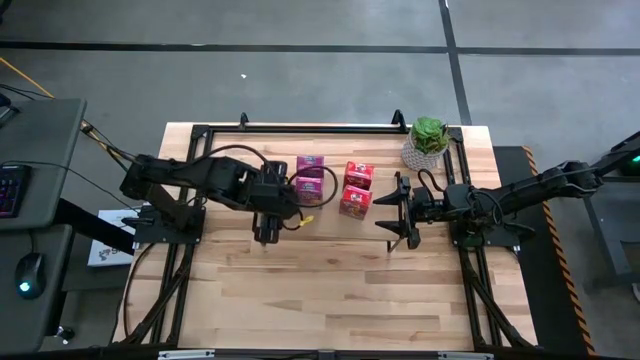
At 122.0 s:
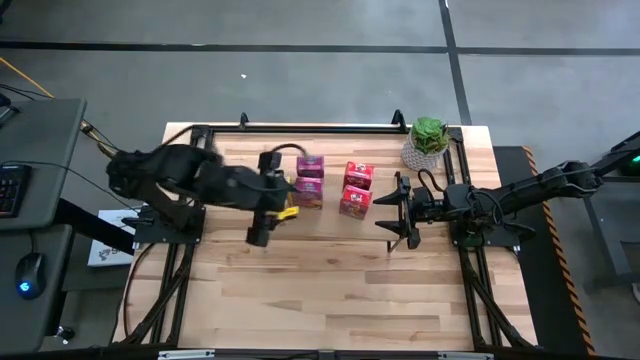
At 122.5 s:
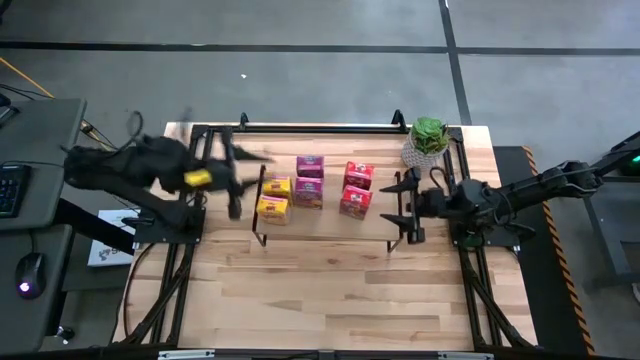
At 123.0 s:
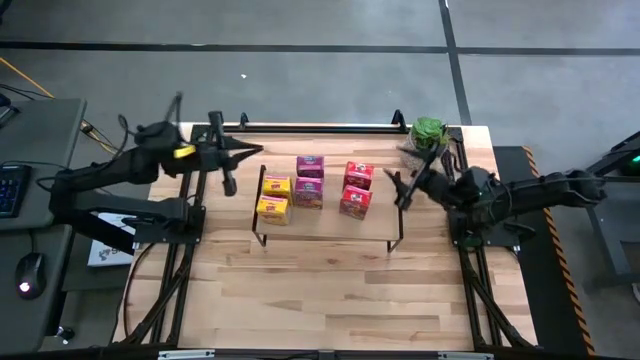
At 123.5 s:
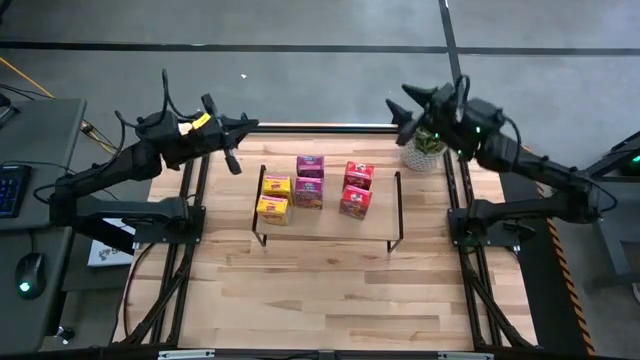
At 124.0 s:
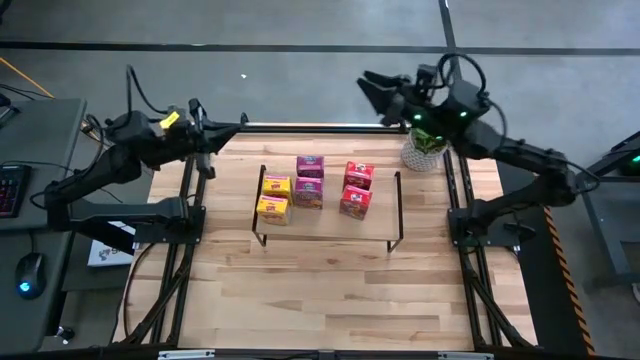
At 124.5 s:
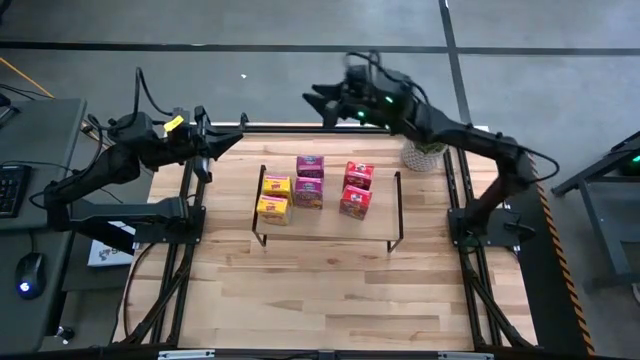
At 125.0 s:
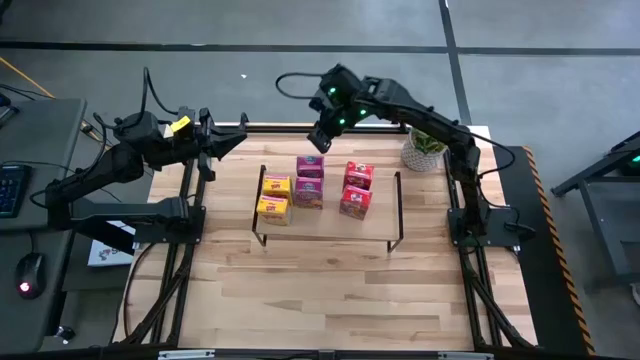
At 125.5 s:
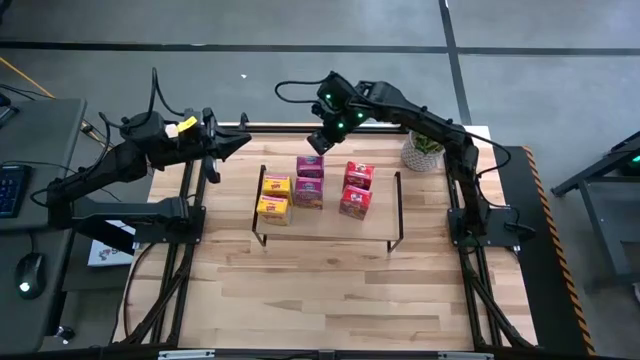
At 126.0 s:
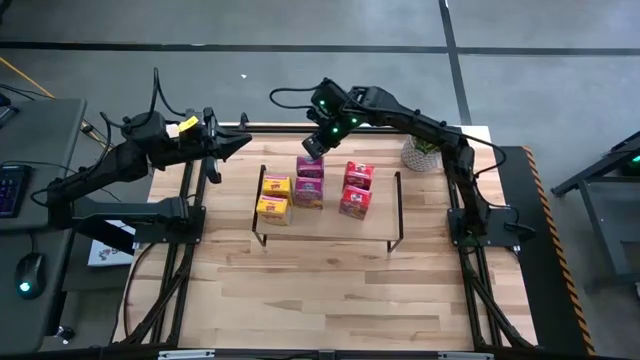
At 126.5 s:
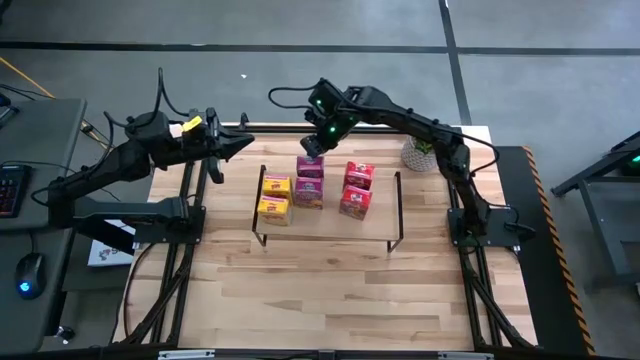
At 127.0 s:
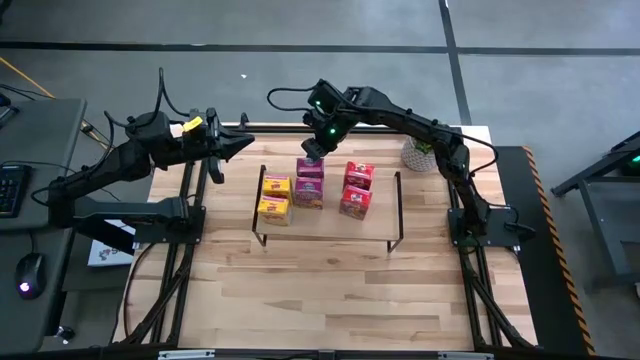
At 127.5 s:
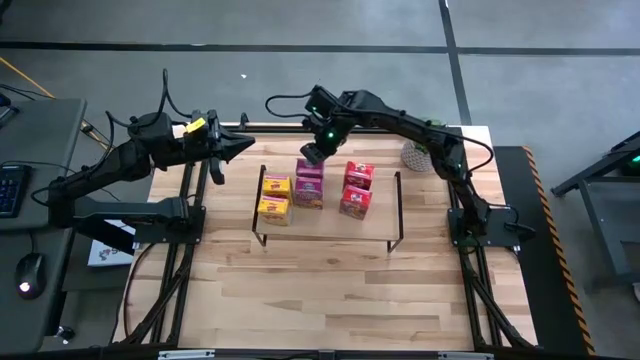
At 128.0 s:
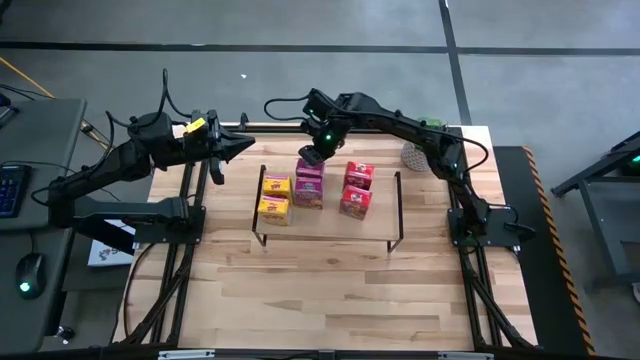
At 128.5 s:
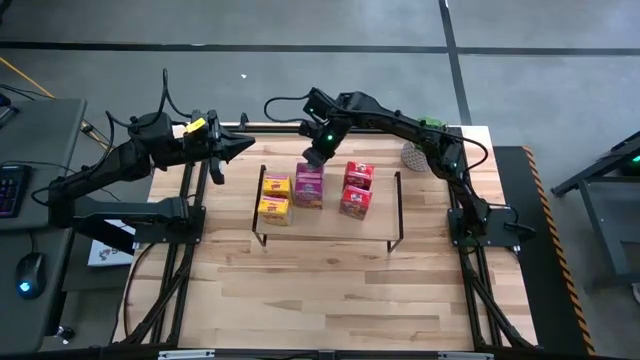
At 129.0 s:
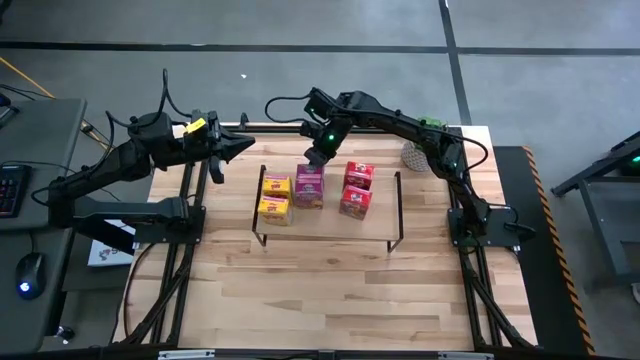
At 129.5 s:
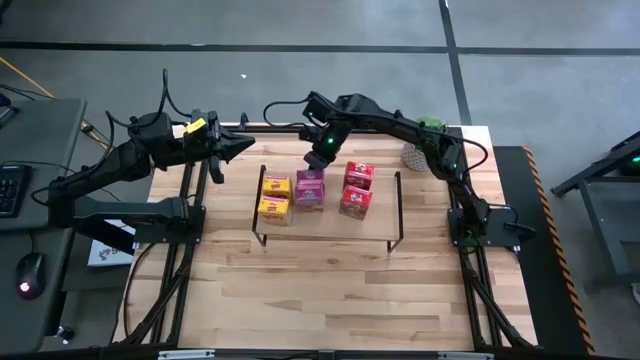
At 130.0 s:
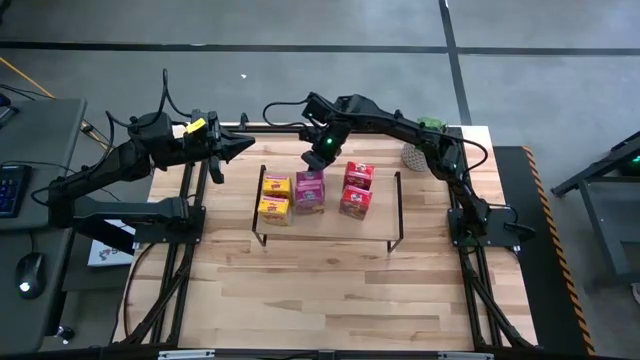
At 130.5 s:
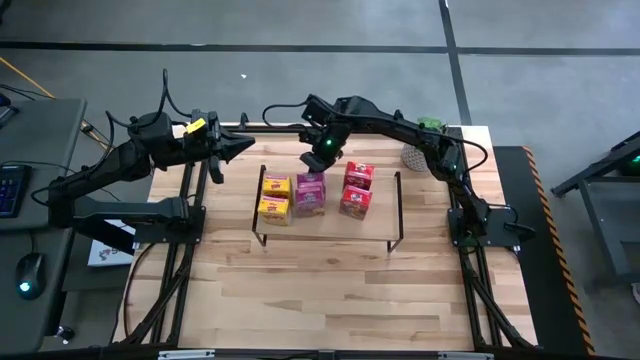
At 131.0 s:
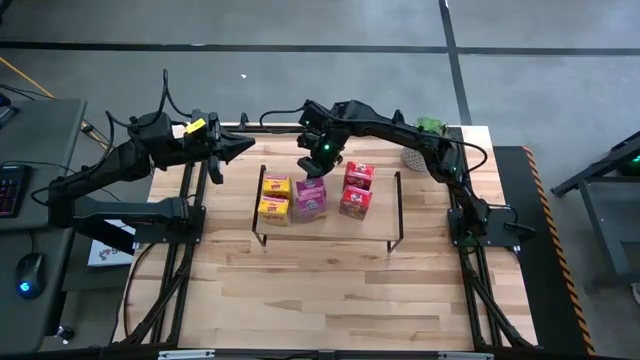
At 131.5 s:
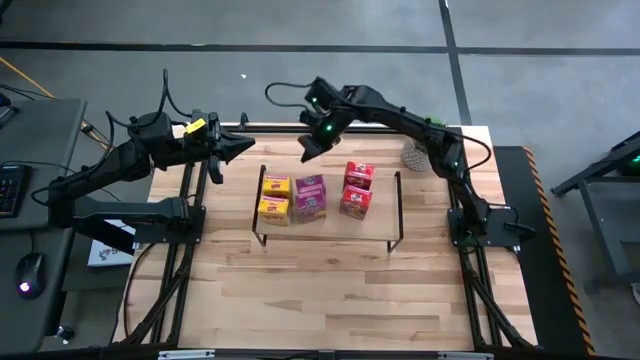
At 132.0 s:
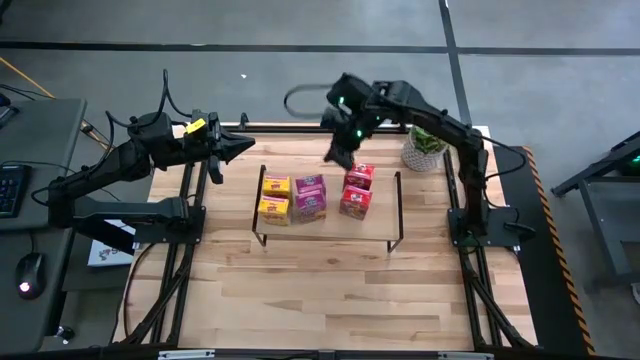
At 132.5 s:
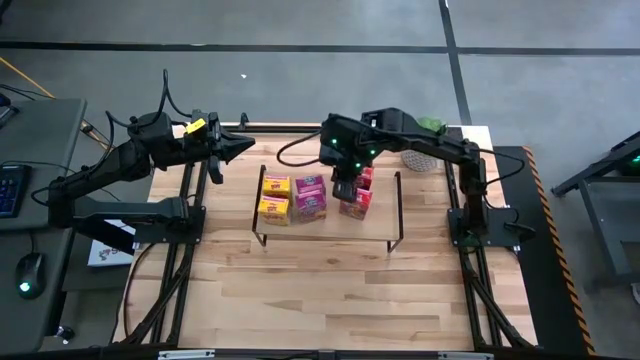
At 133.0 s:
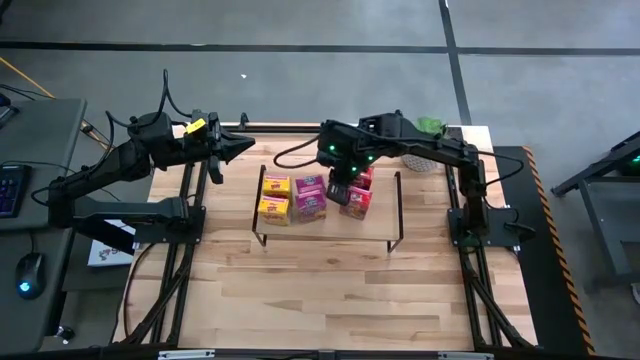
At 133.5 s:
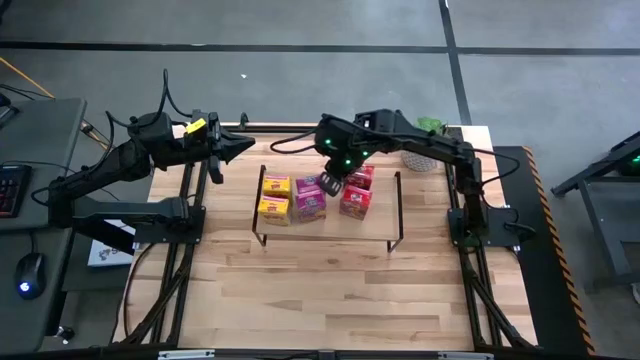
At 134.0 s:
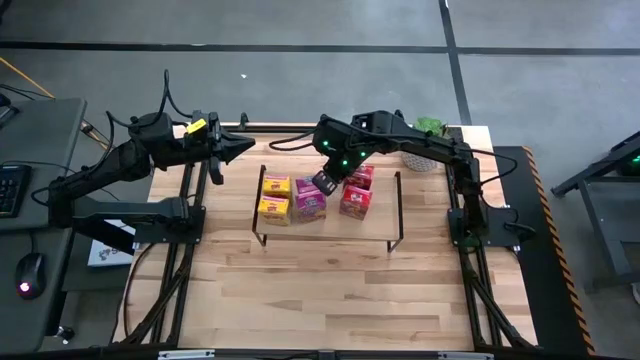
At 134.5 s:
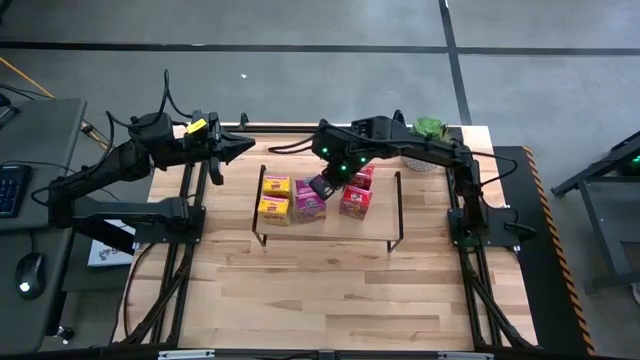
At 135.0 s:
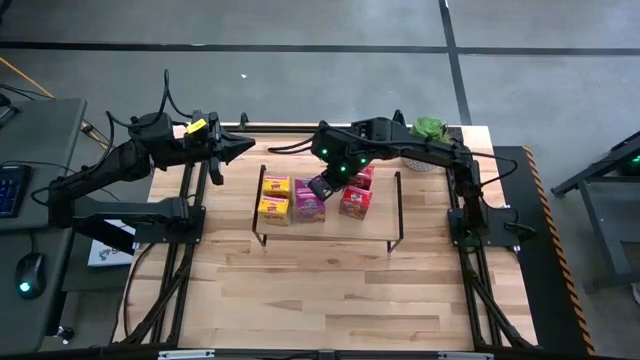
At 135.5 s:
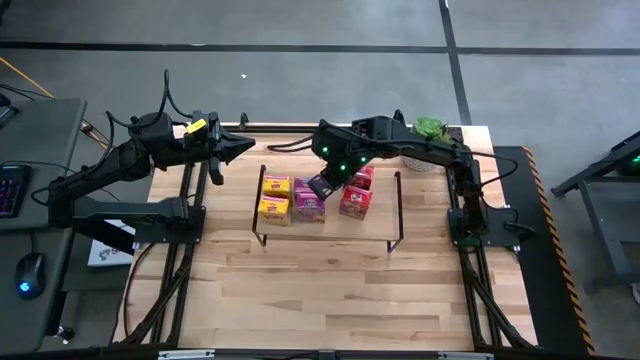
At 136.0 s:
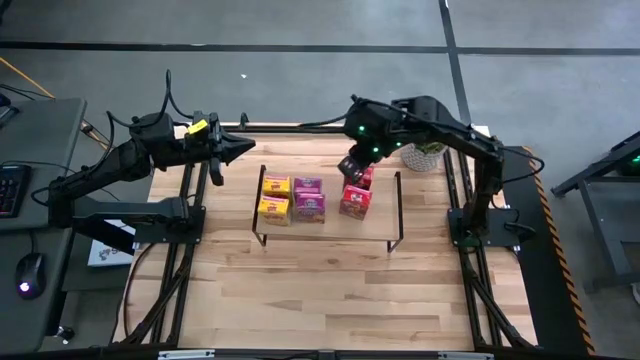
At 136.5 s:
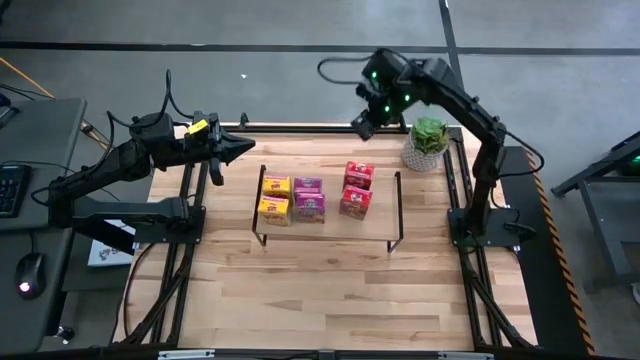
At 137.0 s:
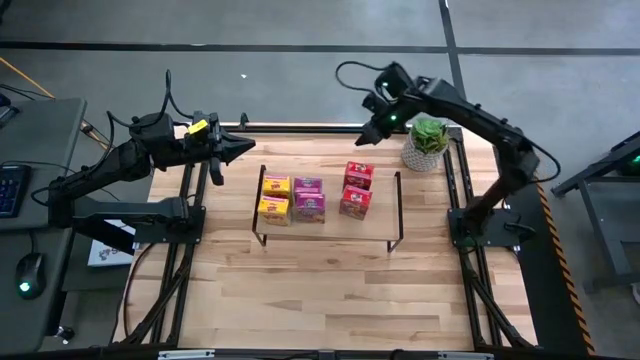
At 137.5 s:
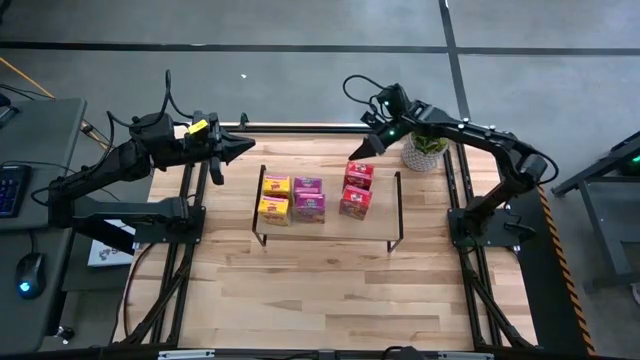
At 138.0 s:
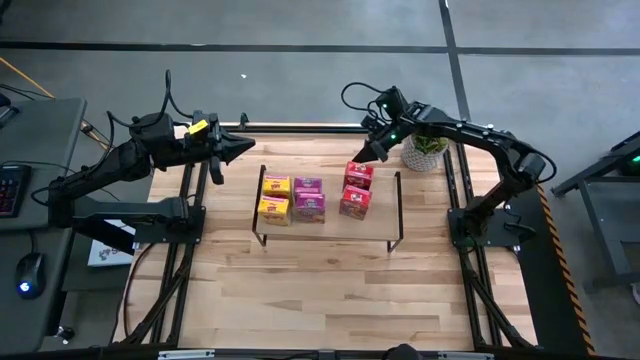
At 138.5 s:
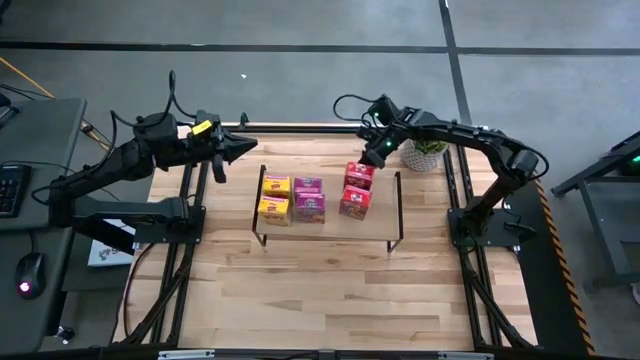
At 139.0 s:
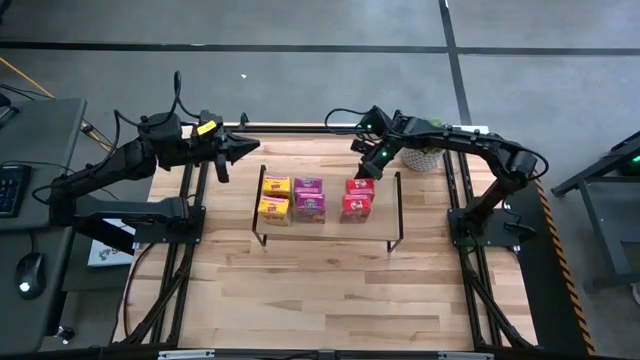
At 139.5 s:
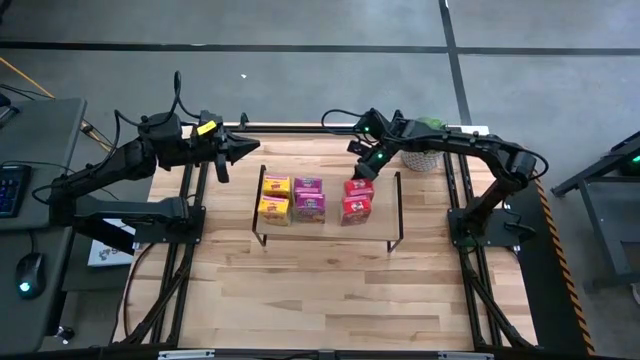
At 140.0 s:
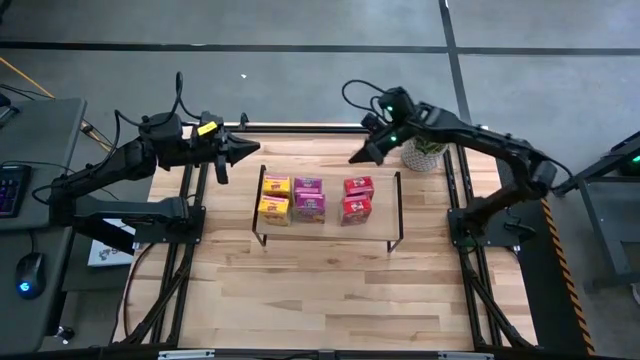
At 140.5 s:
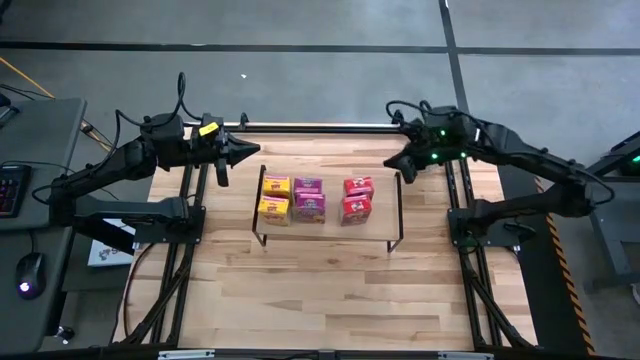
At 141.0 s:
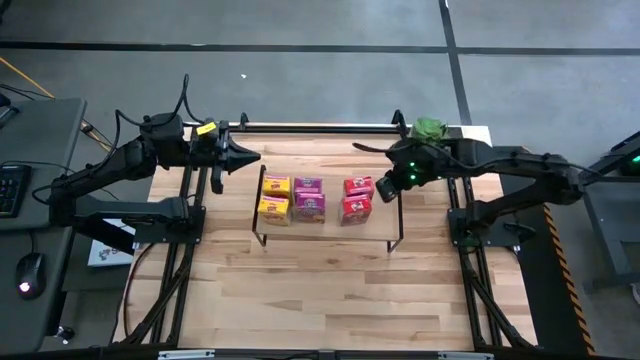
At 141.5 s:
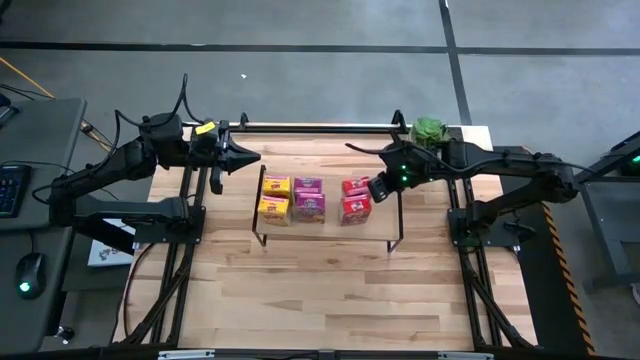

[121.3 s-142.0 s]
Task: Stack cereal on shelf
Adjust the cereal boxes on the shelf
